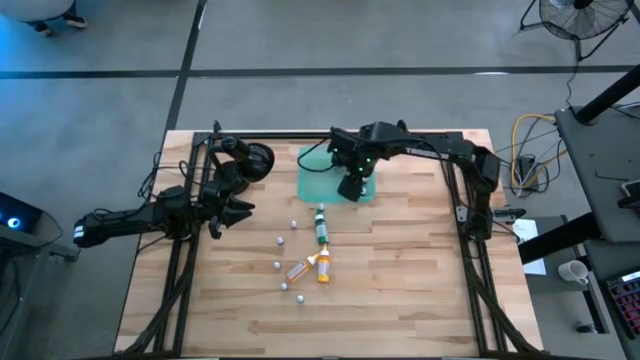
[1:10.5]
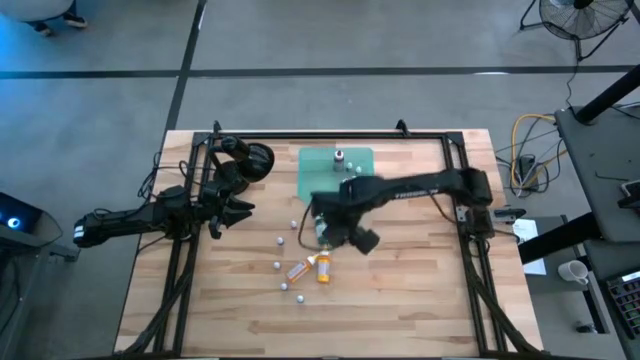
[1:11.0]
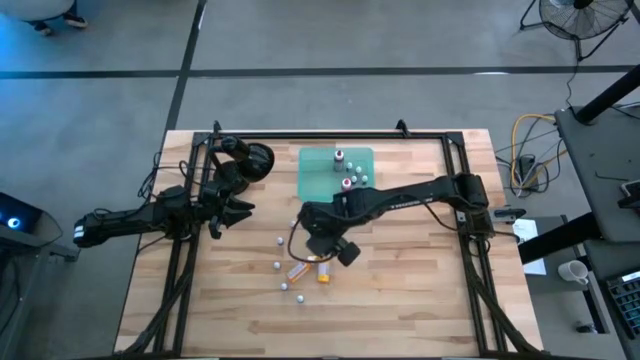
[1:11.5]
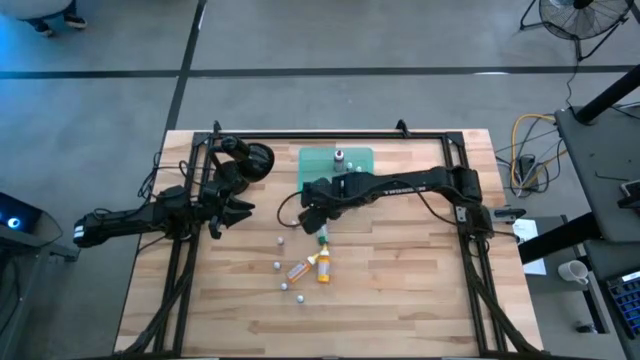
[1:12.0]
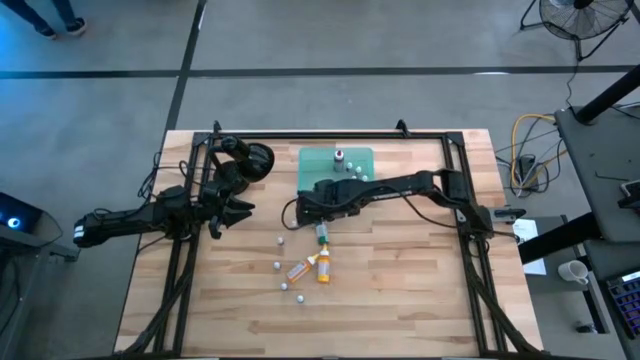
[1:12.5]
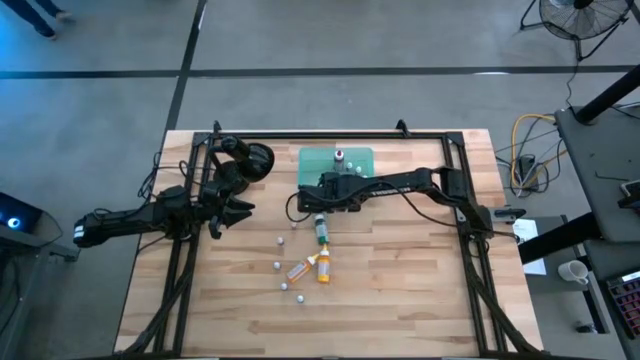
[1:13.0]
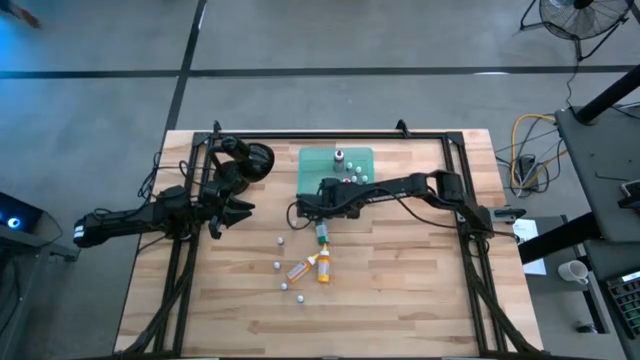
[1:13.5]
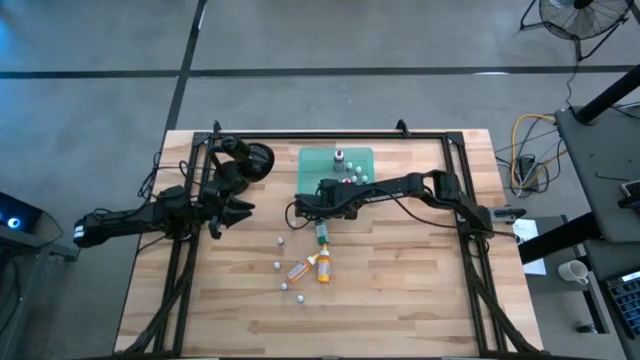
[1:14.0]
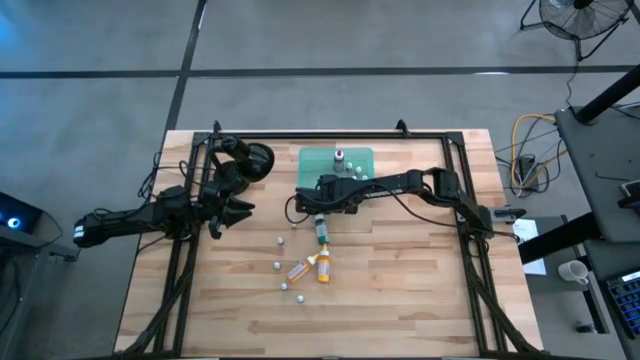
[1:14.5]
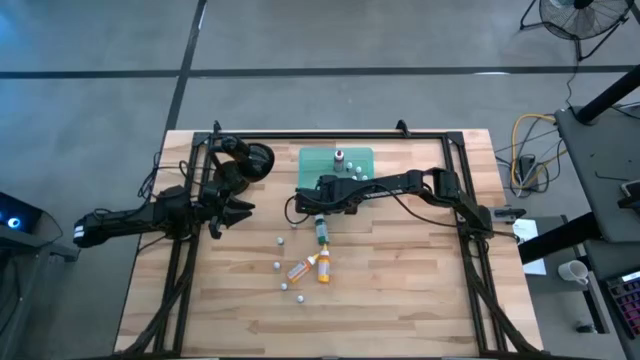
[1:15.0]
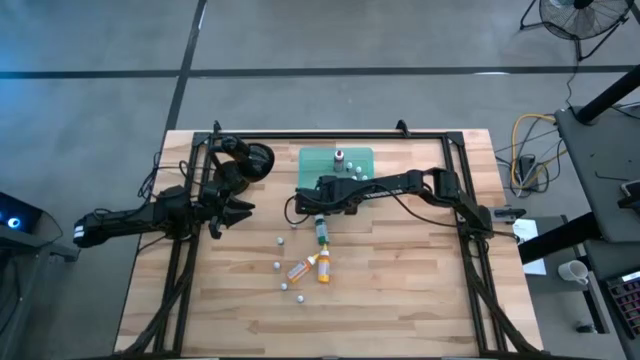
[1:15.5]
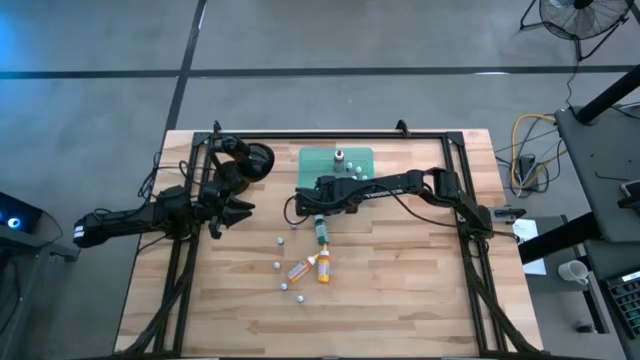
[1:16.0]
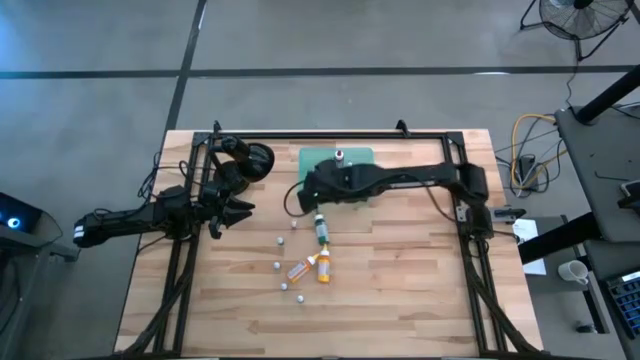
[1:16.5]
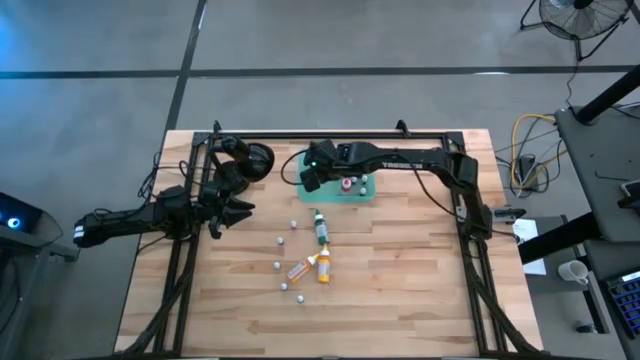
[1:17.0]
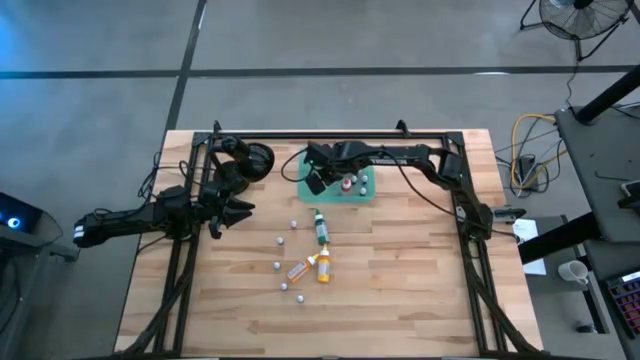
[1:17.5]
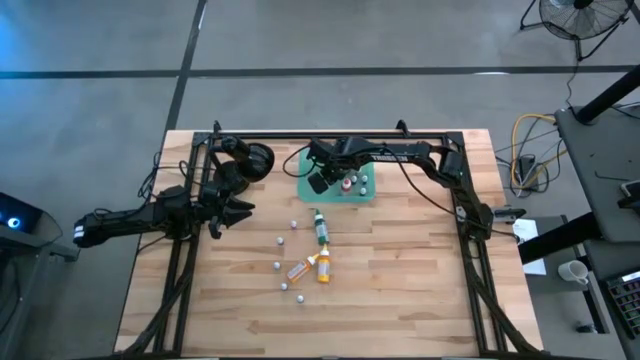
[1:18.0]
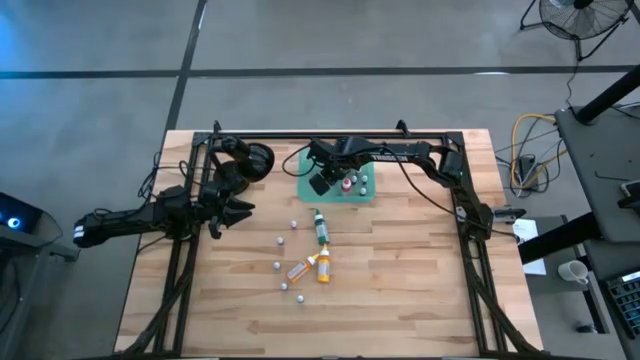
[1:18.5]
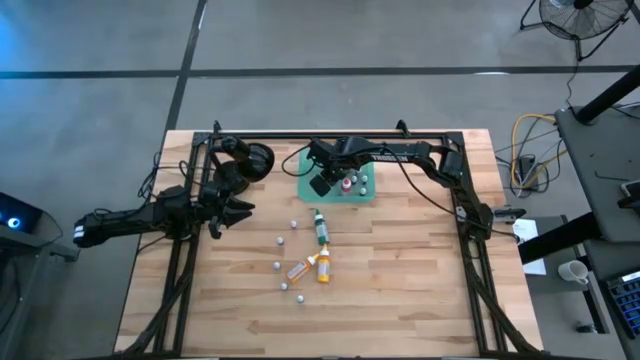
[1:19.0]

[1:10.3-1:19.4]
Task: Pick & Place food coloring
Put the small blue food coloring bottle into the bin

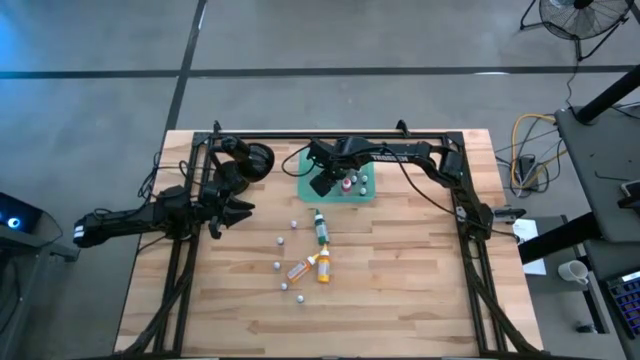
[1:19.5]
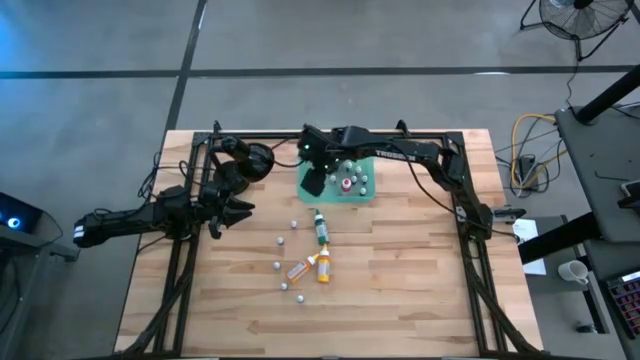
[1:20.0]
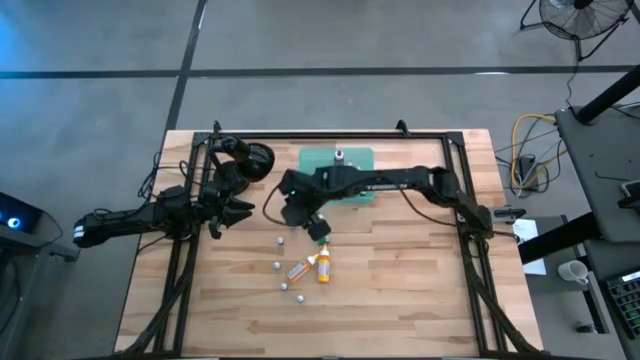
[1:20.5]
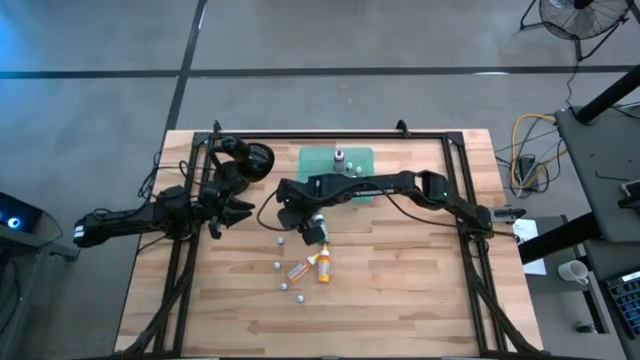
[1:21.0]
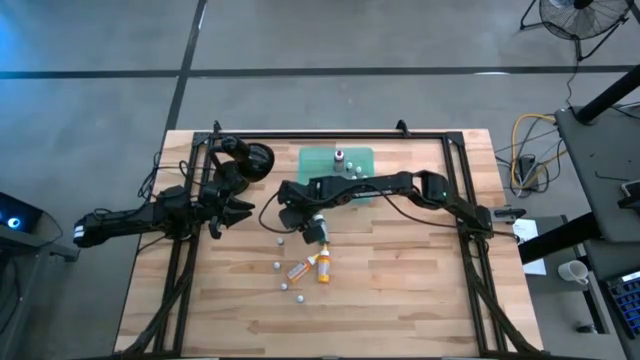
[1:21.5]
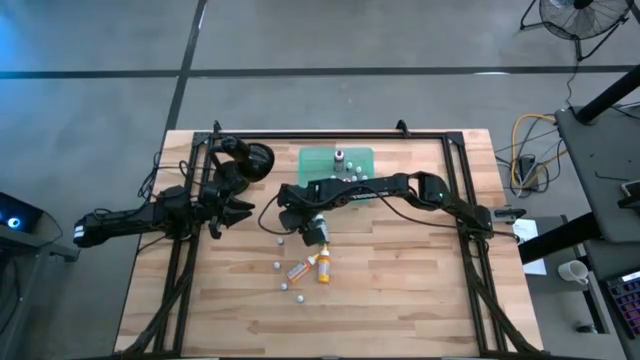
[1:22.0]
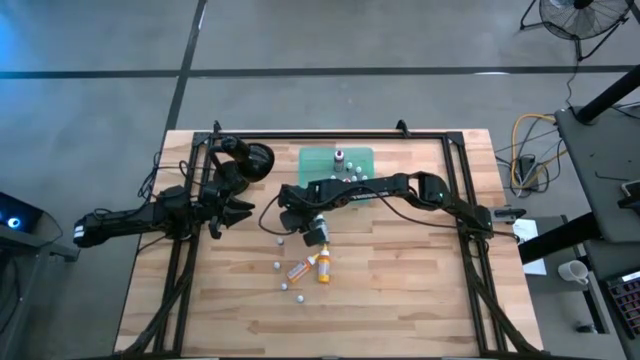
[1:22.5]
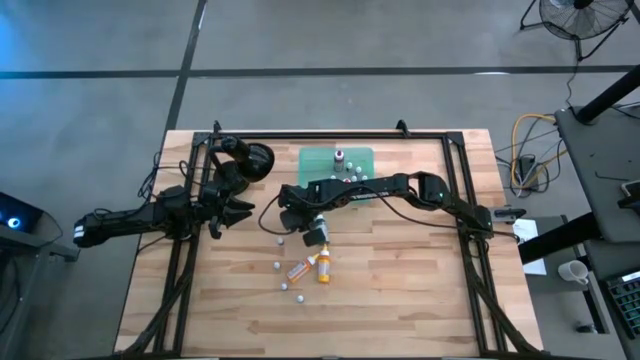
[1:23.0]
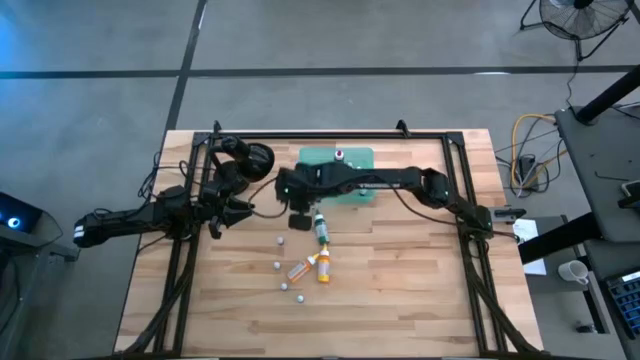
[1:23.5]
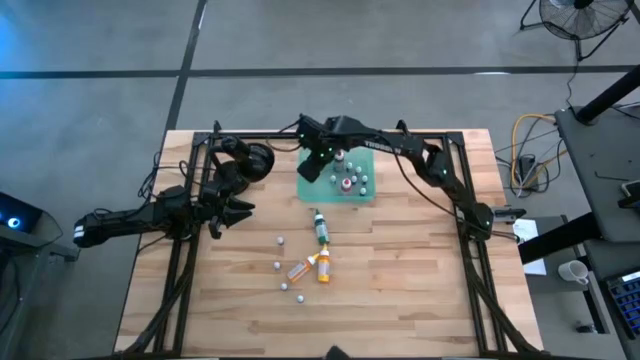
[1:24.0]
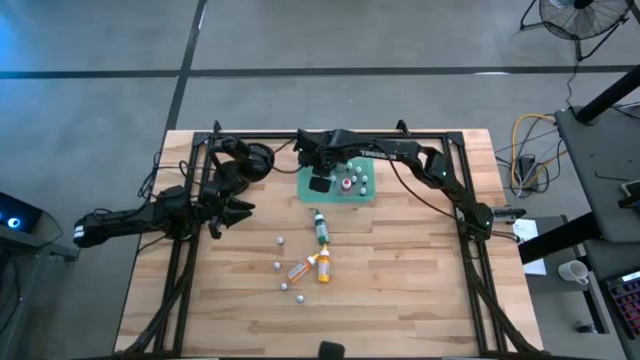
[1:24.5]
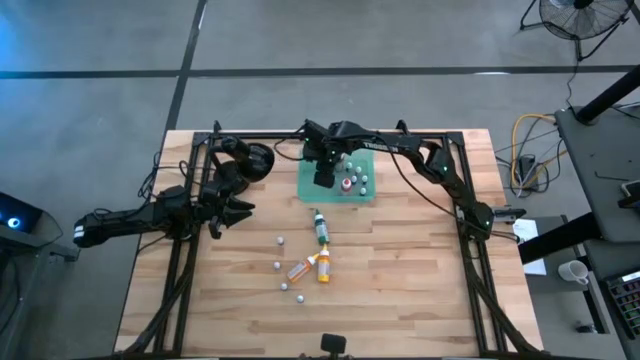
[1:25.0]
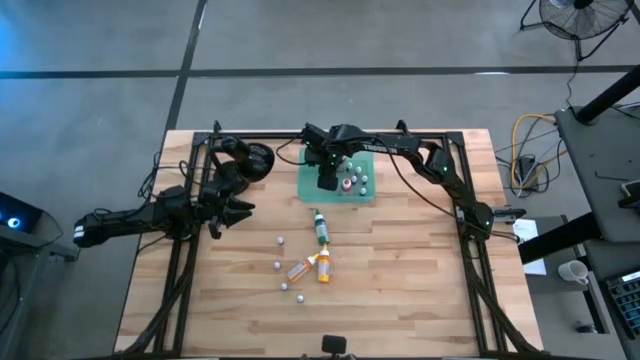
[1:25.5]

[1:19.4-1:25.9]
Put the top left small red food coloring bottle into the bin

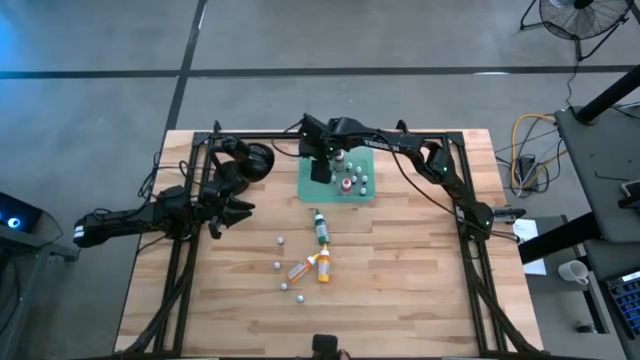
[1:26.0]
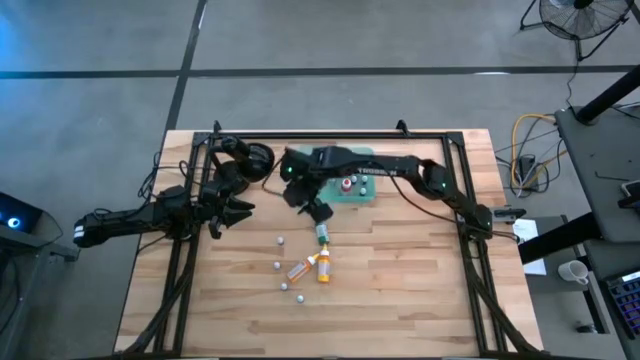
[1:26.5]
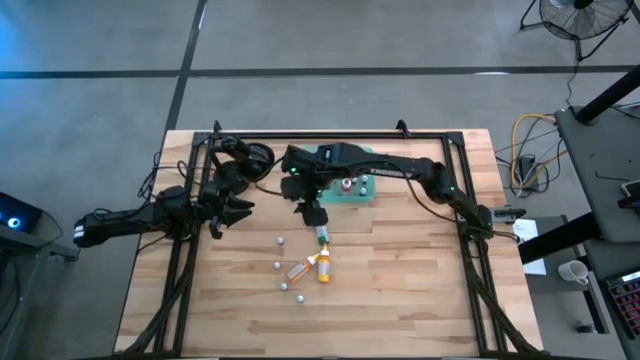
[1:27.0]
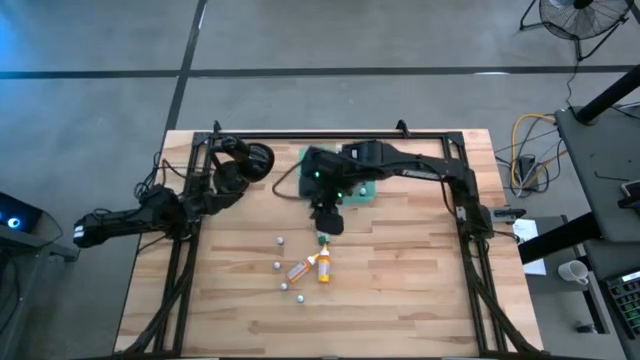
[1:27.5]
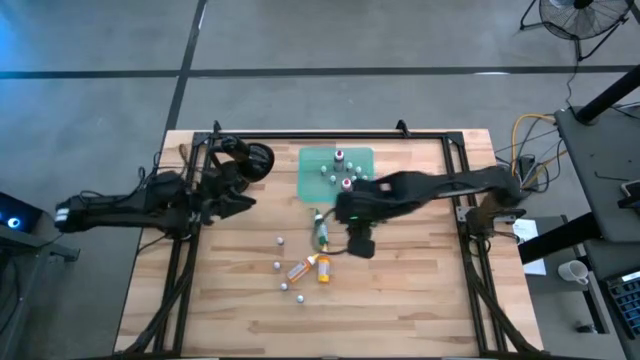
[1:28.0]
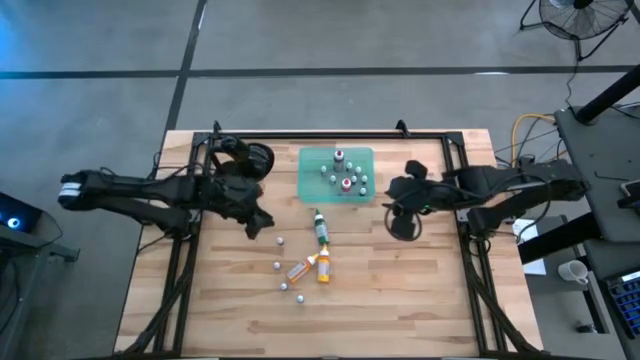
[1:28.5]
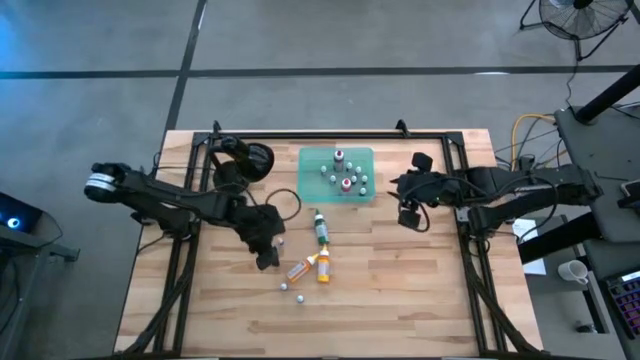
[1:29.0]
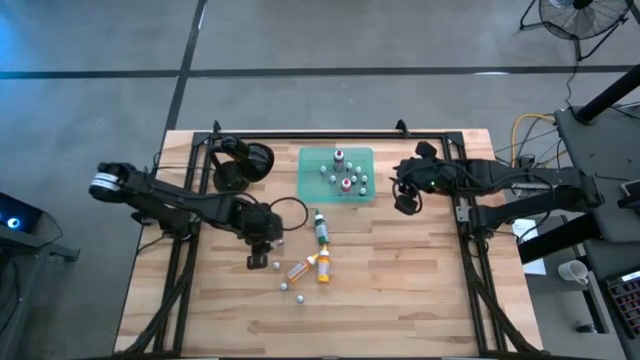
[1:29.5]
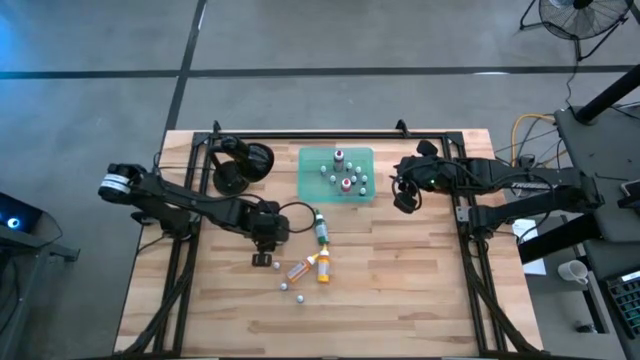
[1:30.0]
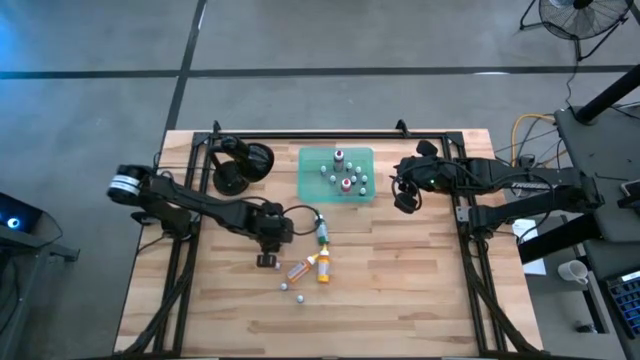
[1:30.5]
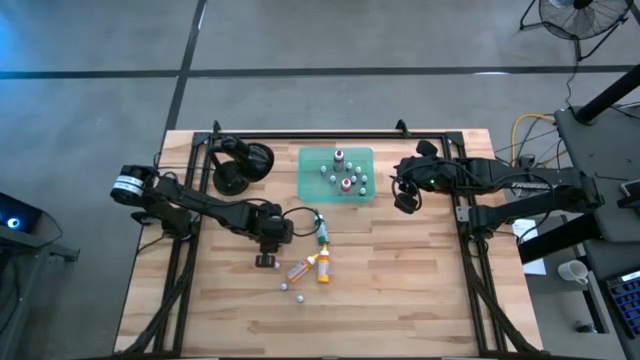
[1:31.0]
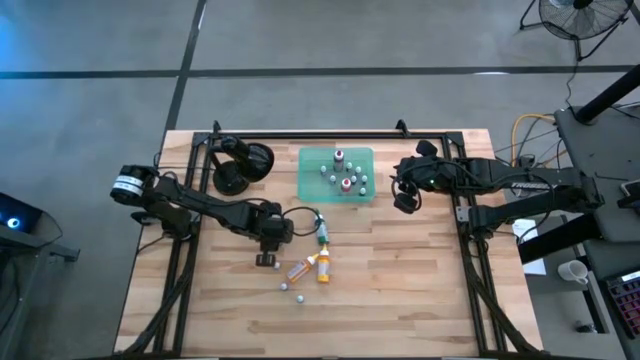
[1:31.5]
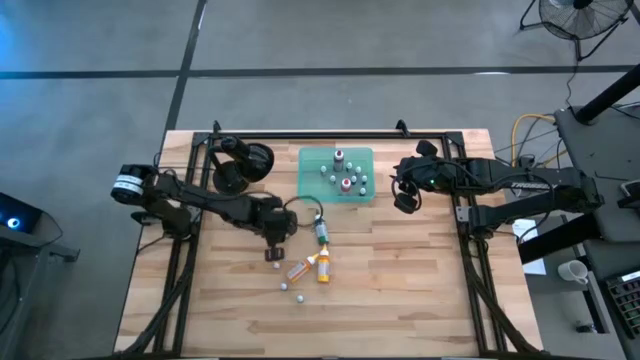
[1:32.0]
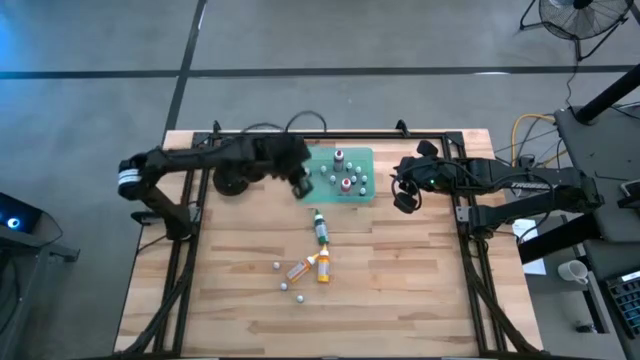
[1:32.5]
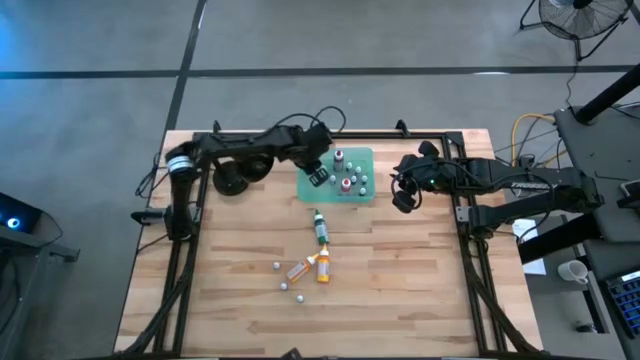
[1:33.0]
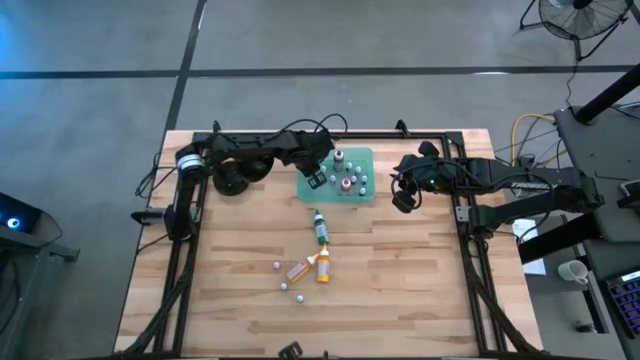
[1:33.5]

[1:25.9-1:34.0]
Put the top left small green food coloring bottle into the bin
